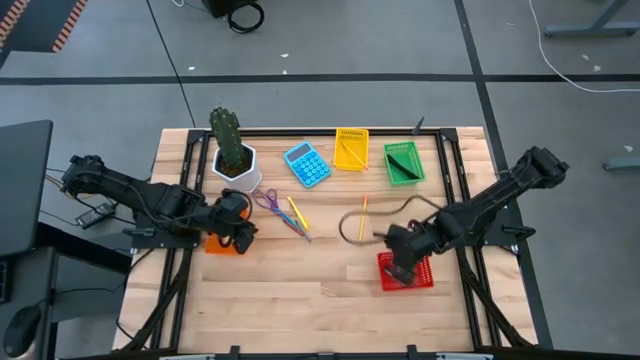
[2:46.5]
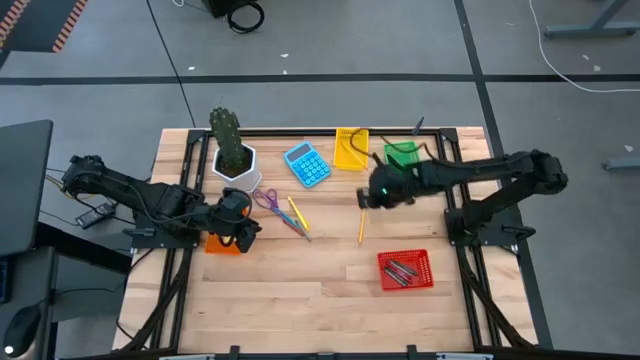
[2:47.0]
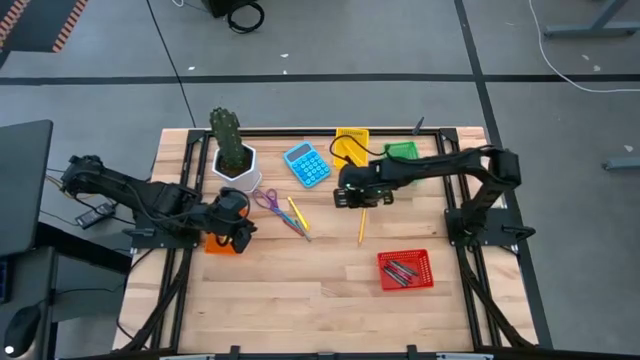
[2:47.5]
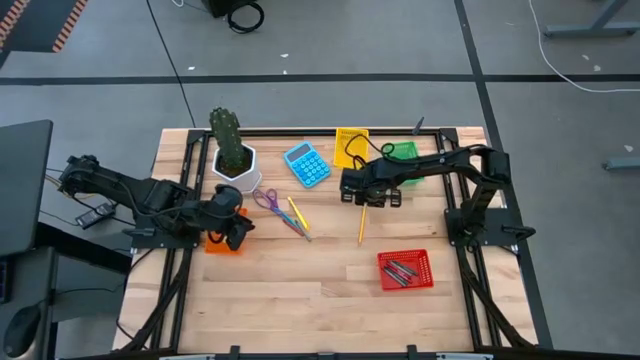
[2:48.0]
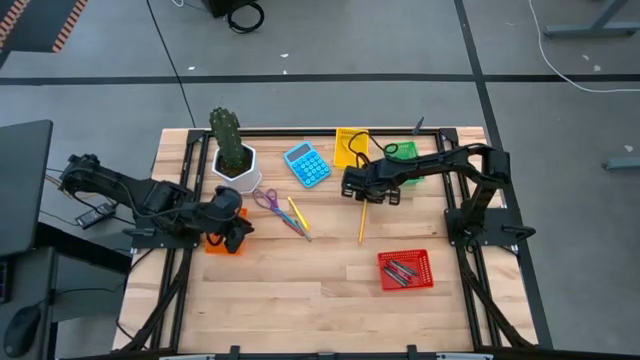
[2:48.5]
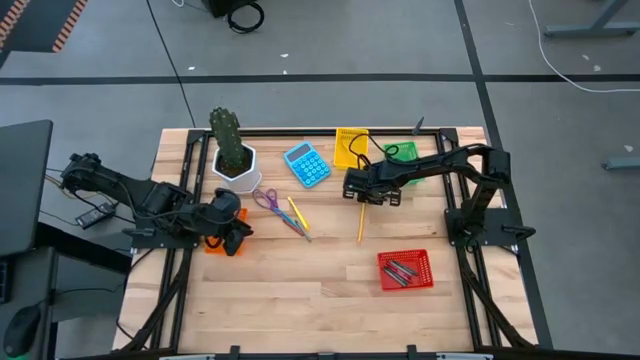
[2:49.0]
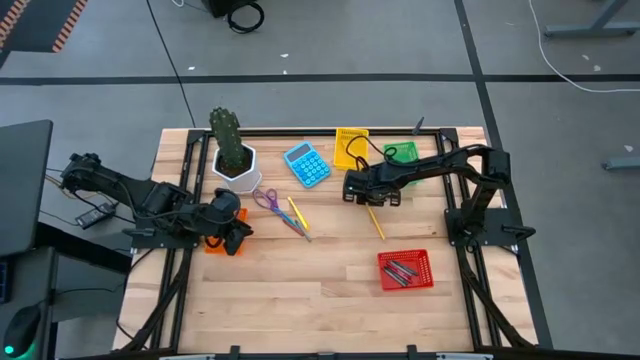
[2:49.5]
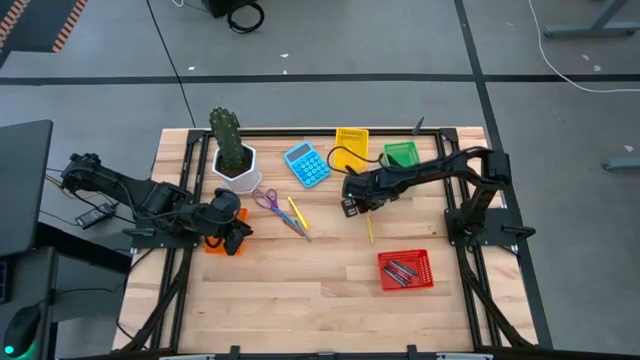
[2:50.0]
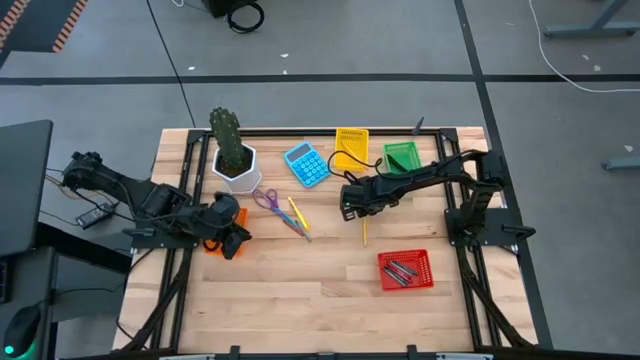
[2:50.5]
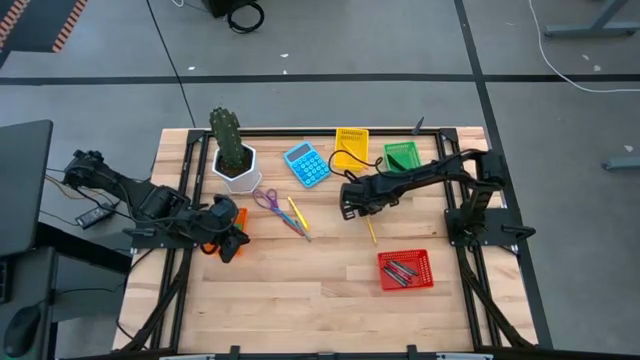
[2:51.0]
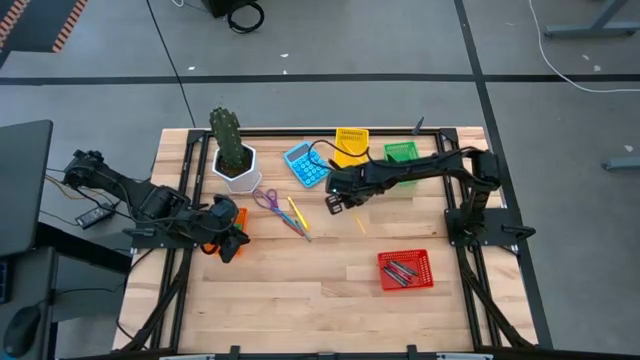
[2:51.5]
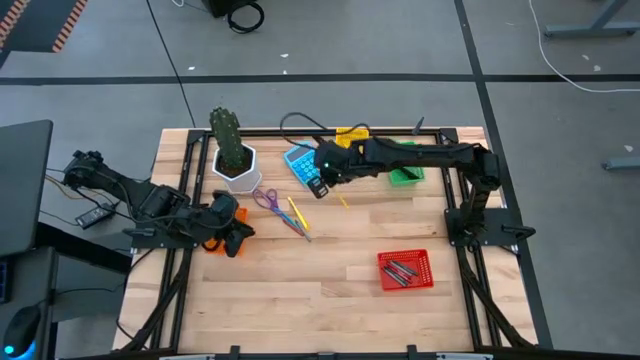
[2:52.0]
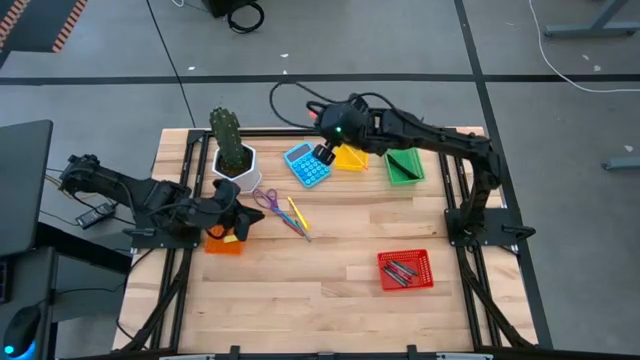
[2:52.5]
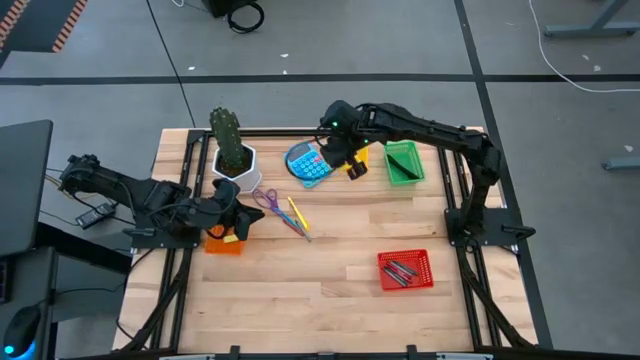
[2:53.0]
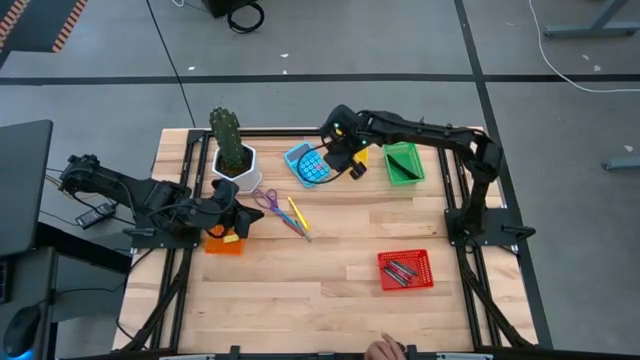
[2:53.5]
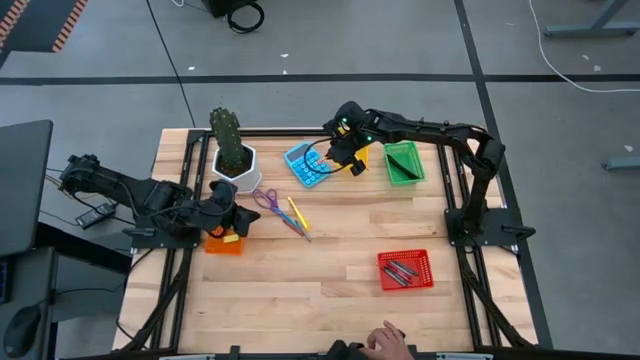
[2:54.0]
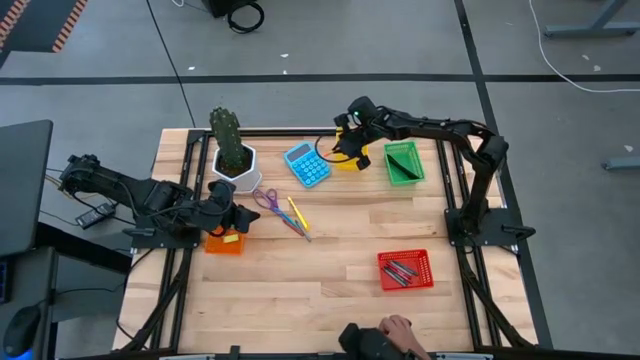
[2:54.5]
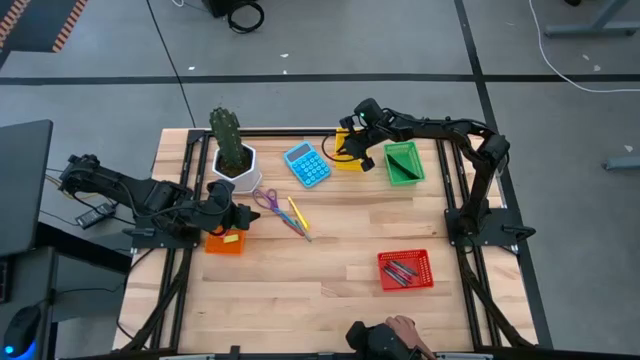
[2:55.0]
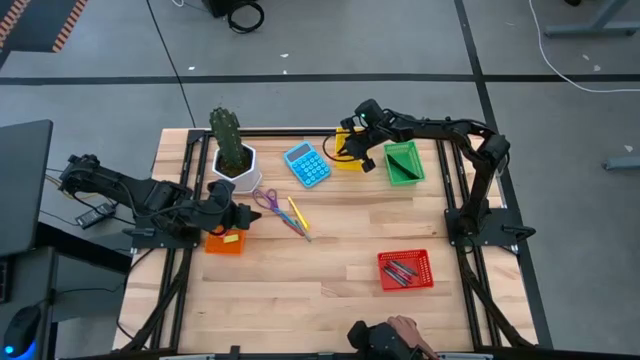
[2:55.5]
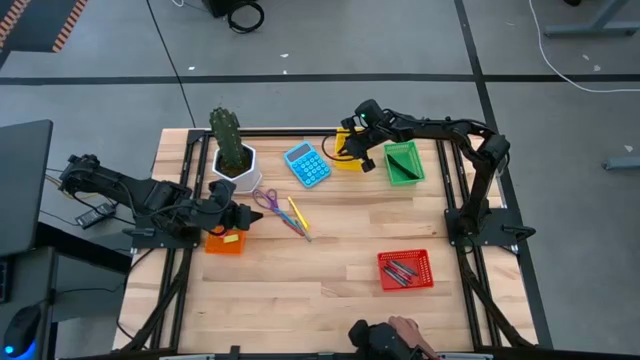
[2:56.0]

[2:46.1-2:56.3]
Task: Sort crayons/erasers/pens/pencils in bins
Put the yellow pencil into the yellow bin

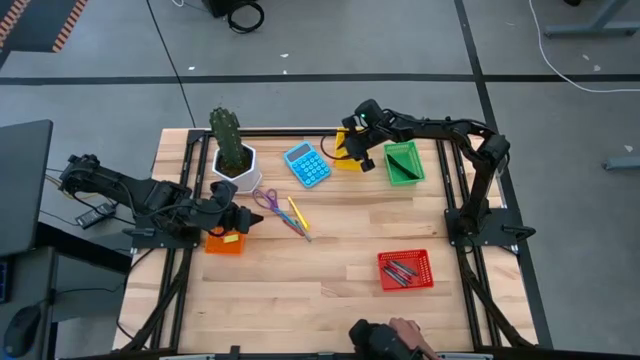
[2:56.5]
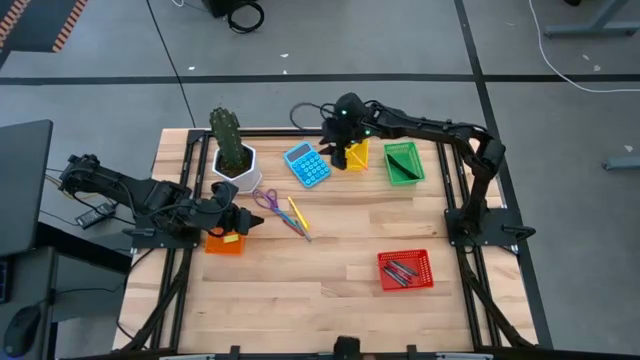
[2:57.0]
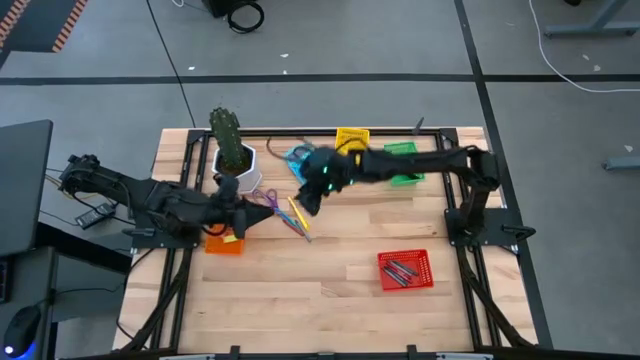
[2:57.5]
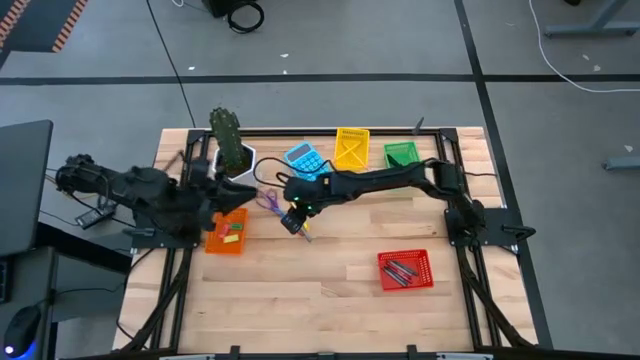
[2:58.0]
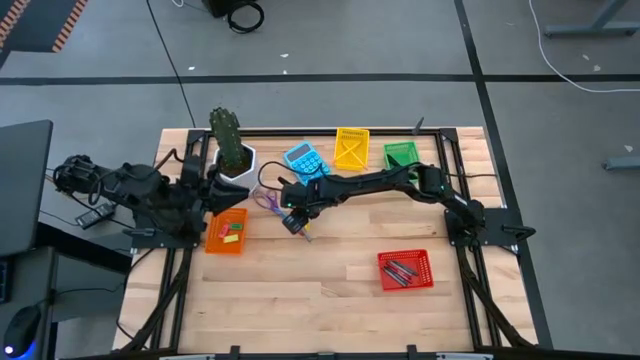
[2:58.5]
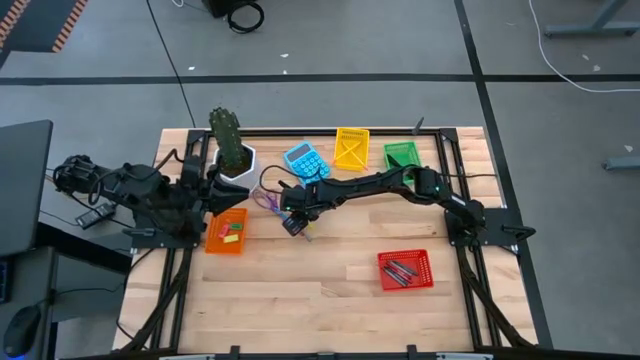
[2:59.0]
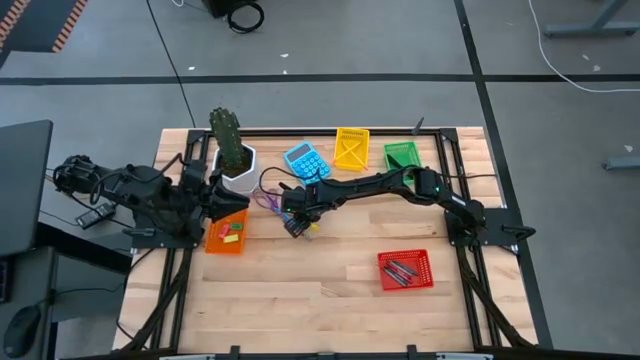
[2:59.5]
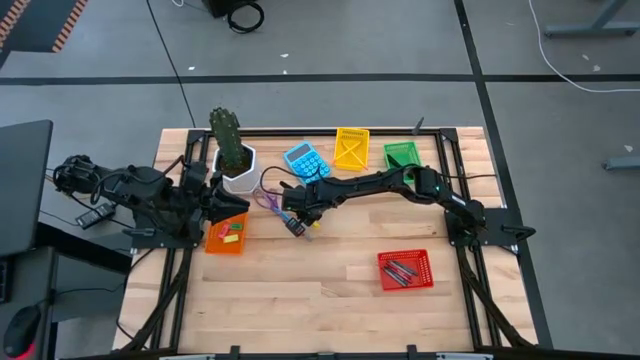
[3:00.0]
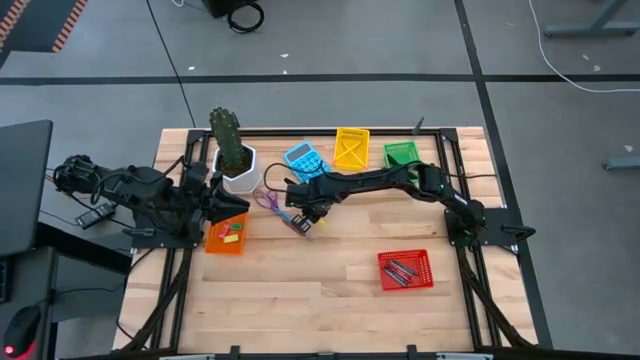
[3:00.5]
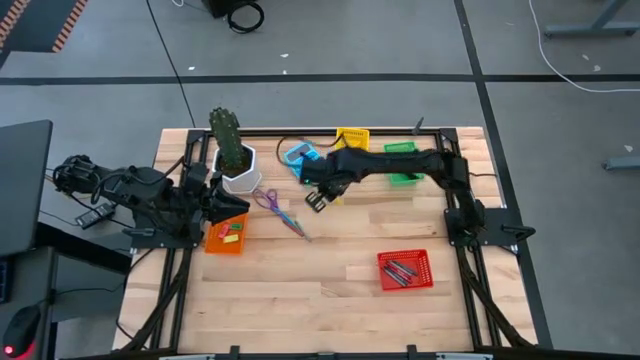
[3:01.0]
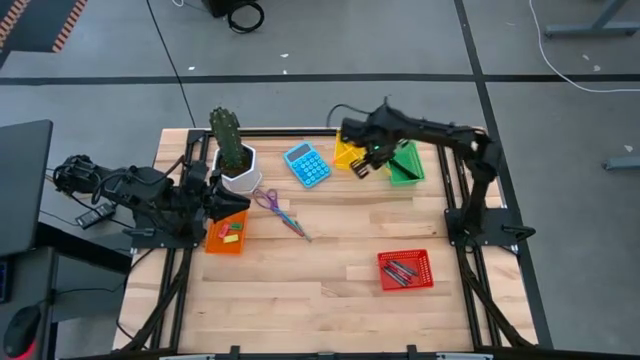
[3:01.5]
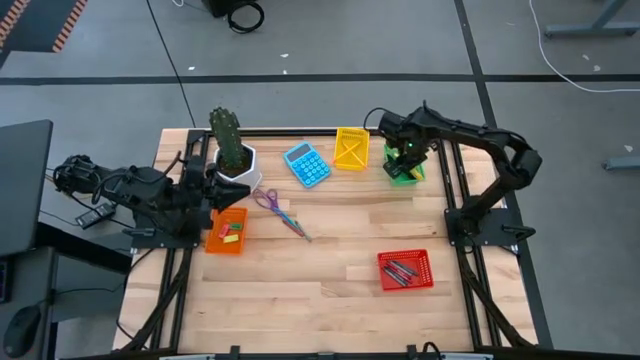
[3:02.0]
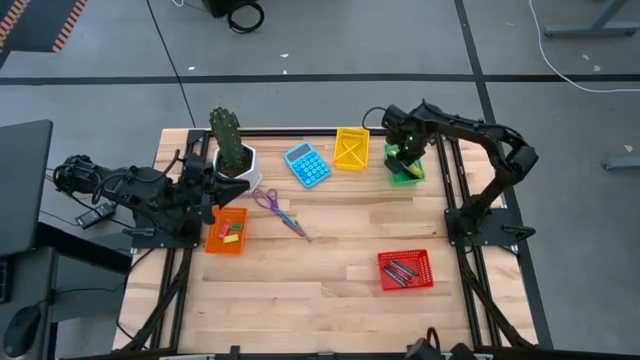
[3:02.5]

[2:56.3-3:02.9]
Put the yellow pen into the green bin

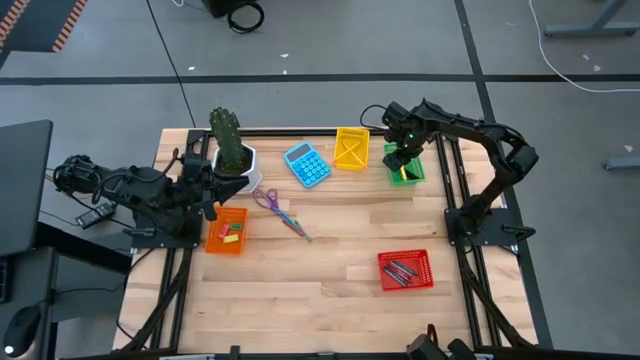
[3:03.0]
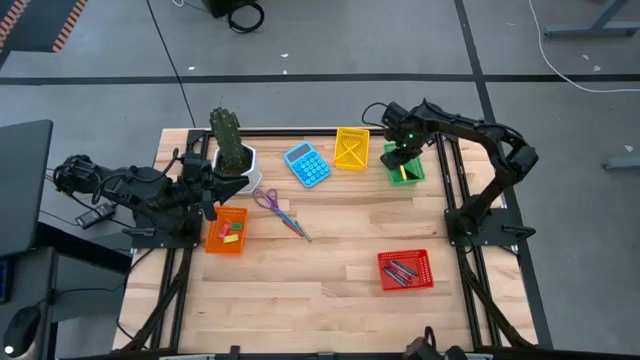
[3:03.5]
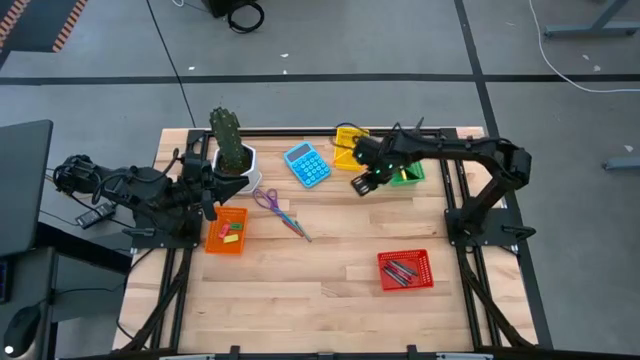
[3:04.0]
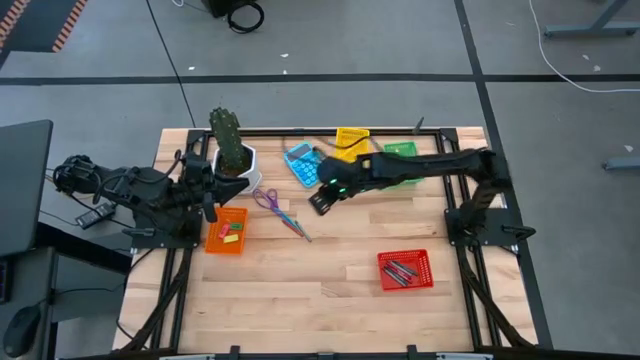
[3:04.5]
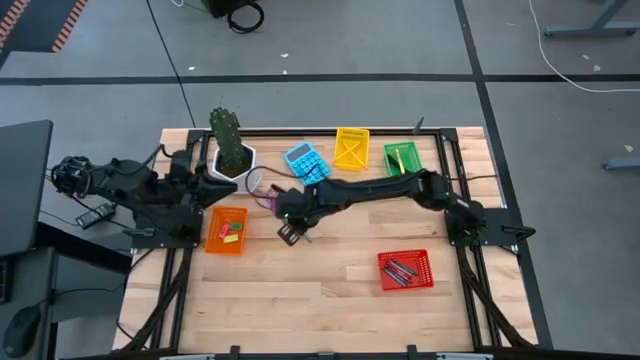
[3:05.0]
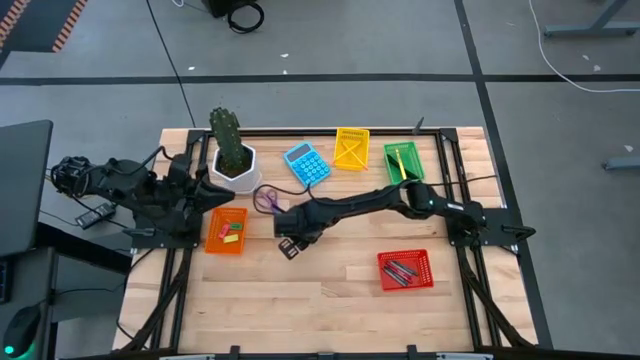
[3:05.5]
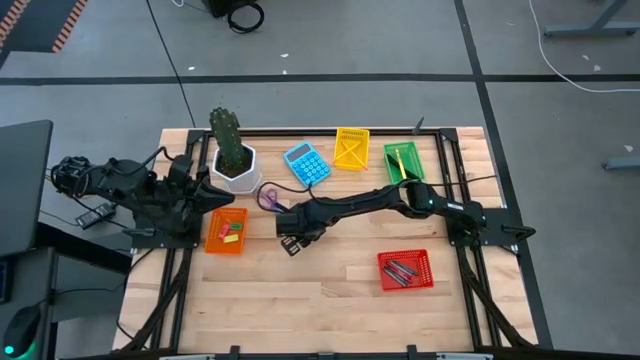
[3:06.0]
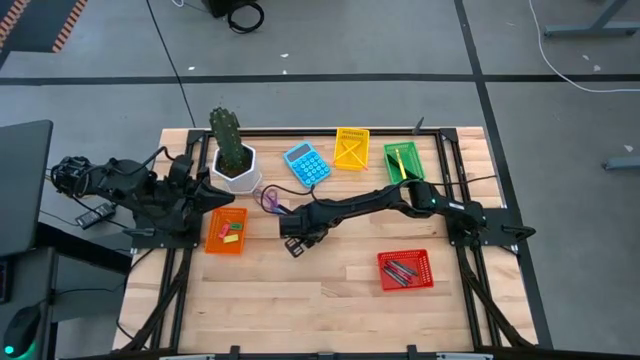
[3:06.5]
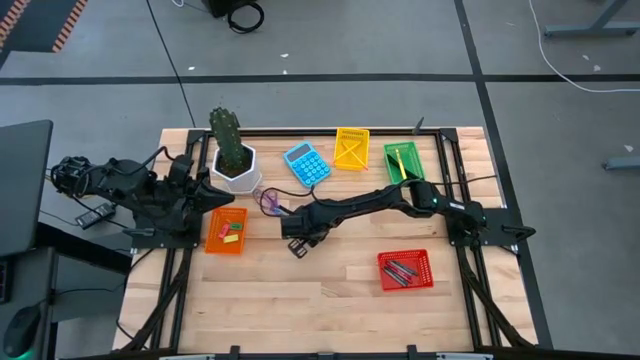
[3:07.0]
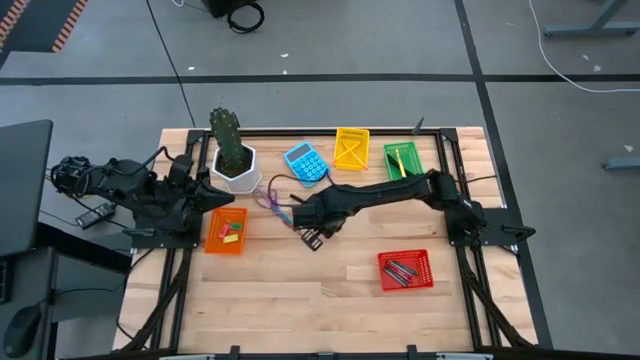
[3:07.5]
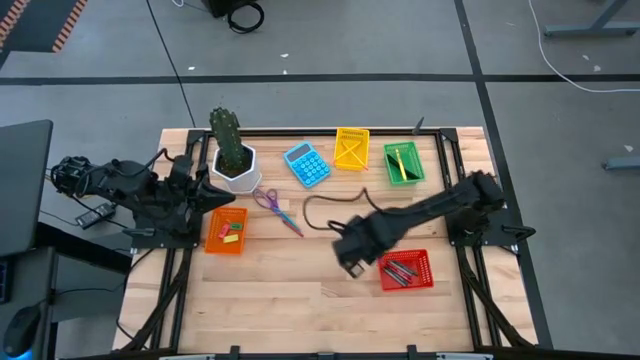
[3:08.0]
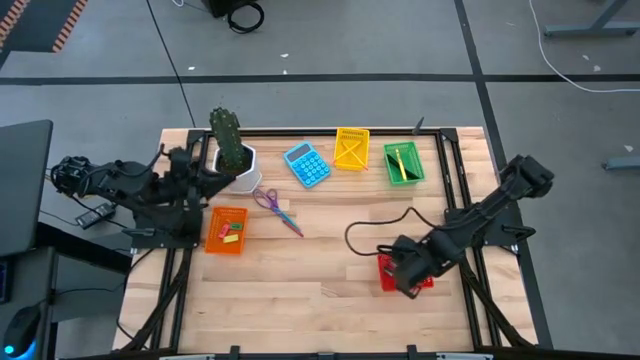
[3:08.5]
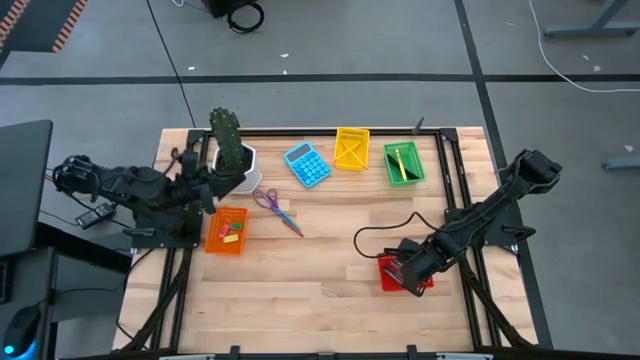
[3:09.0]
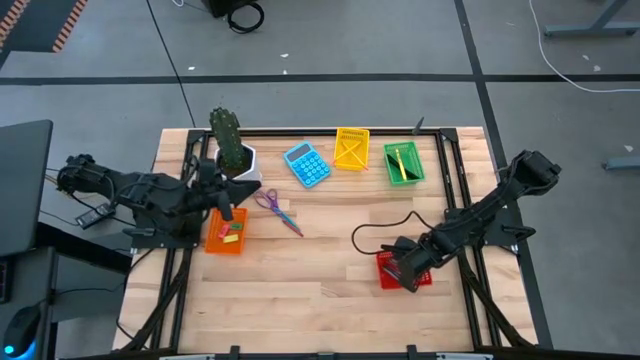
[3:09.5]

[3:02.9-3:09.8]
Put the gray crayon into the red bin
